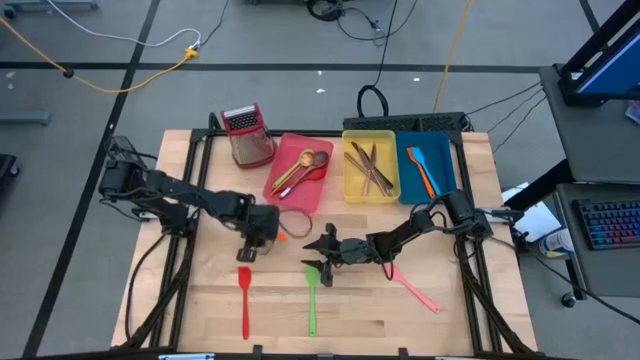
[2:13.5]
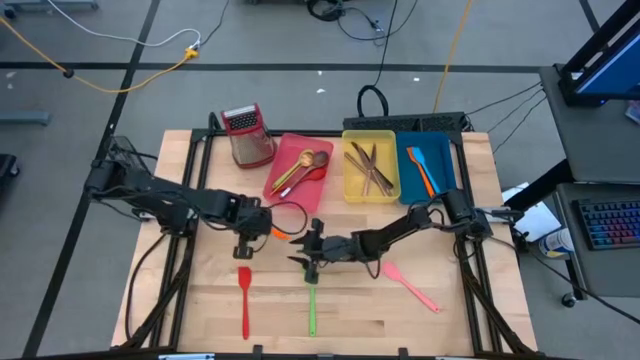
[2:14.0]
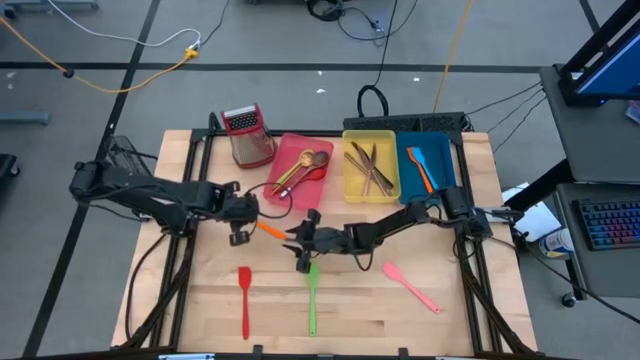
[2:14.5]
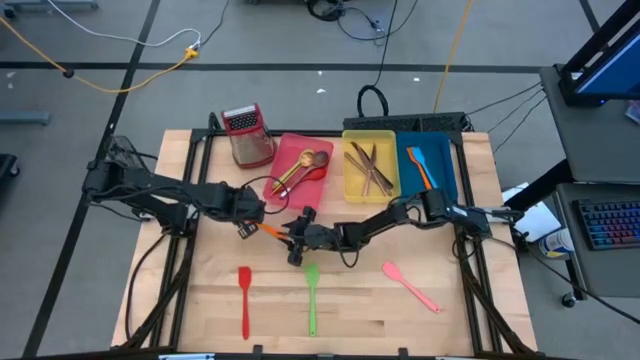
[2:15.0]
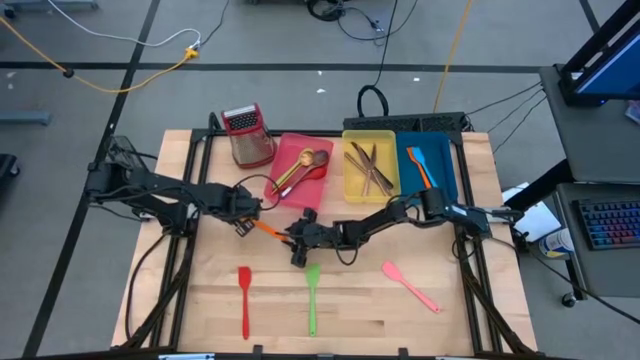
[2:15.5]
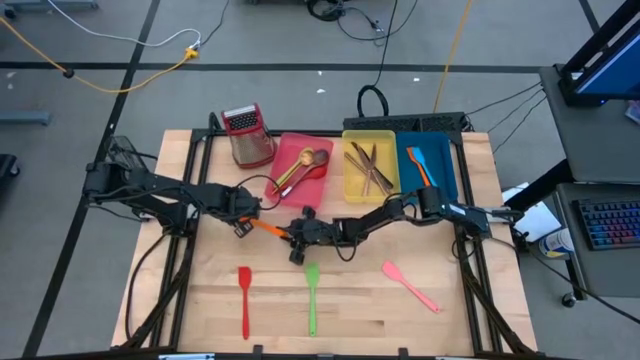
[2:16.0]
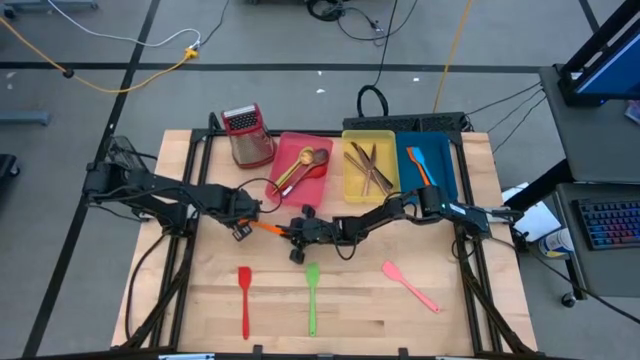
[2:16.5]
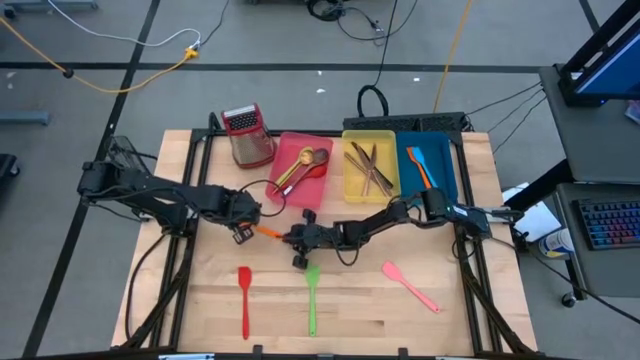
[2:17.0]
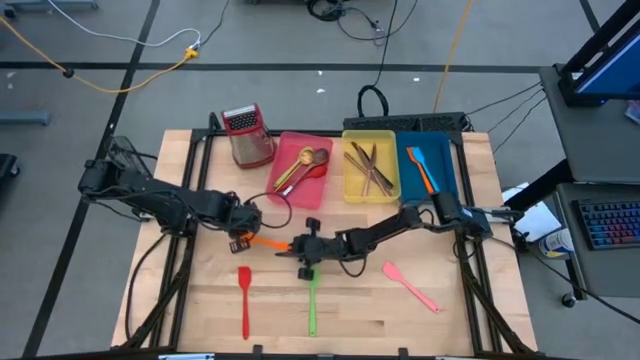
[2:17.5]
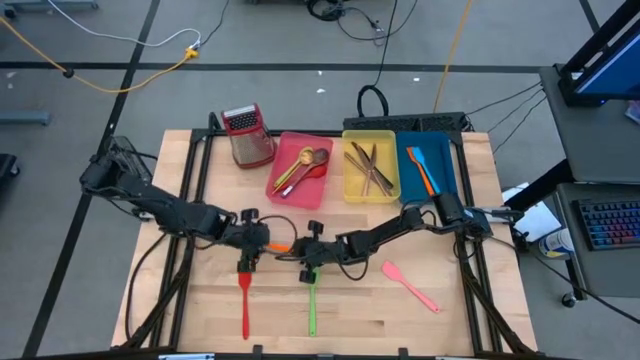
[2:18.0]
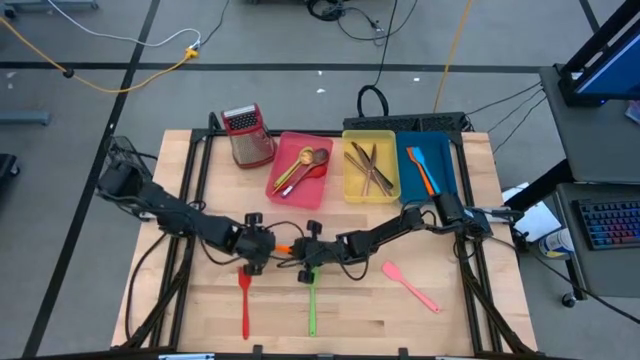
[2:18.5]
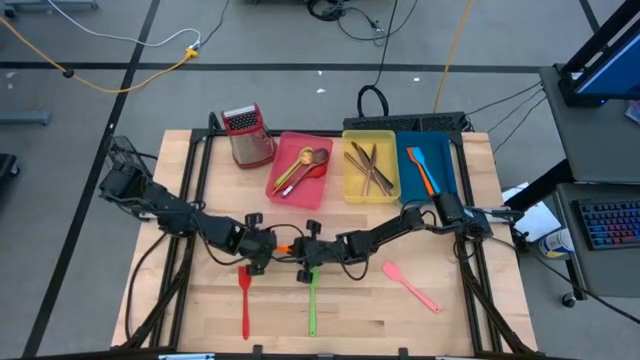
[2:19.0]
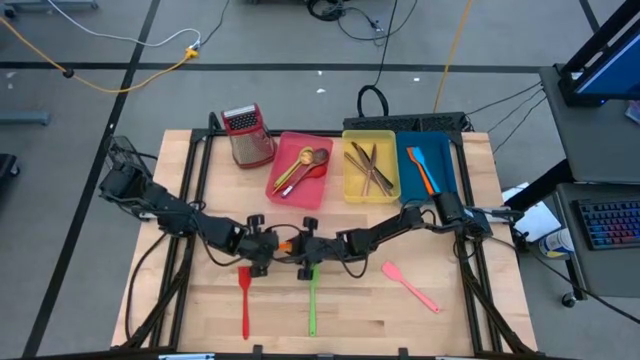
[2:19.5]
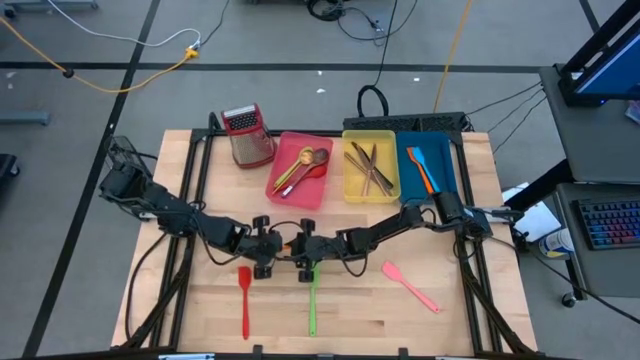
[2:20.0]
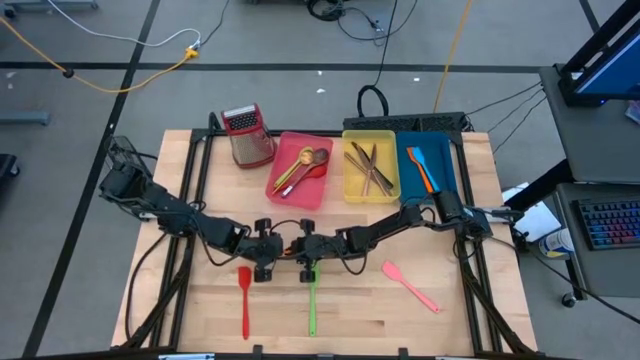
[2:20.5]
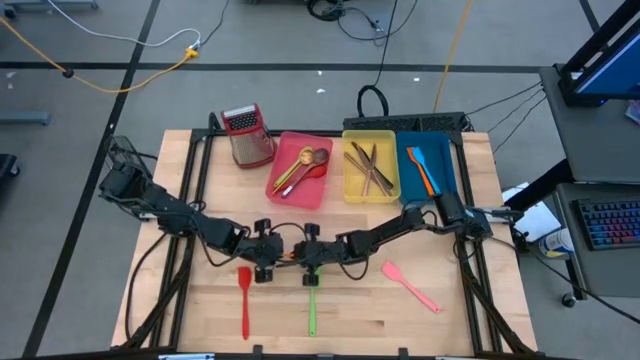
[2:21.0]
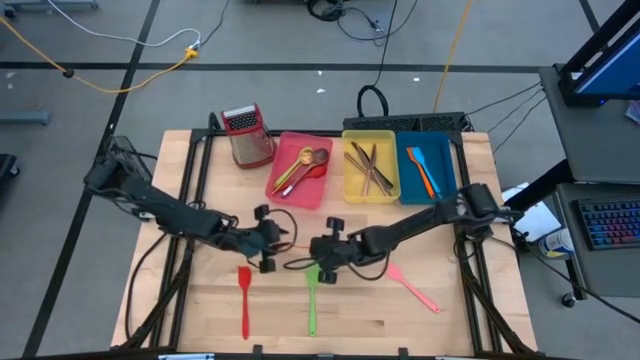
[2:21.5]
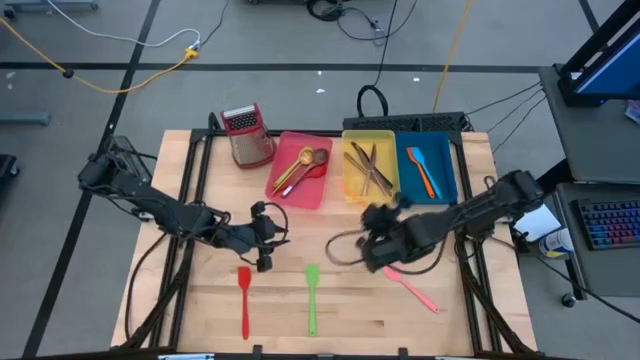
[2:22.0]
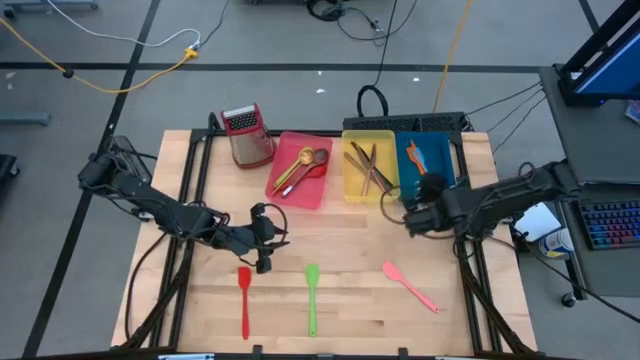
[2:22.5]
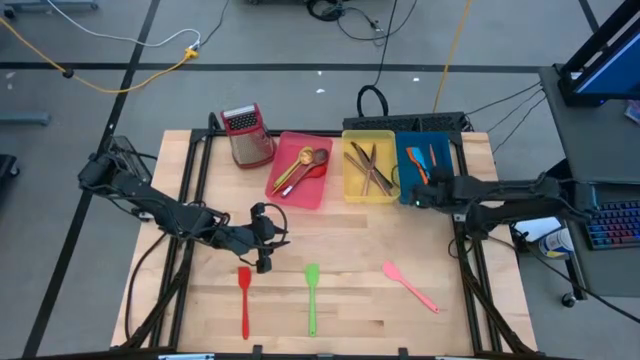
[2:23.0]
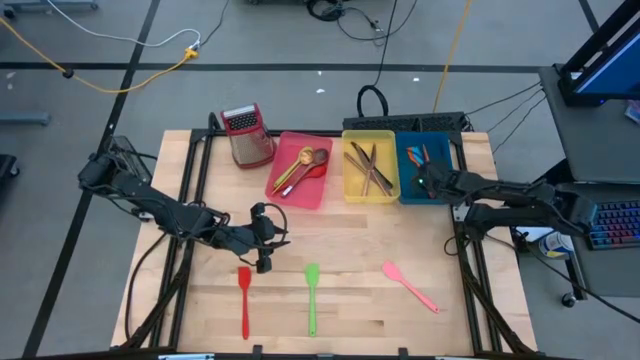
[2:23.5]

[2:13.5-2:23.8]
Task: Pick & Place Kitchen Items
Put the orange serving spoon into the blue bin

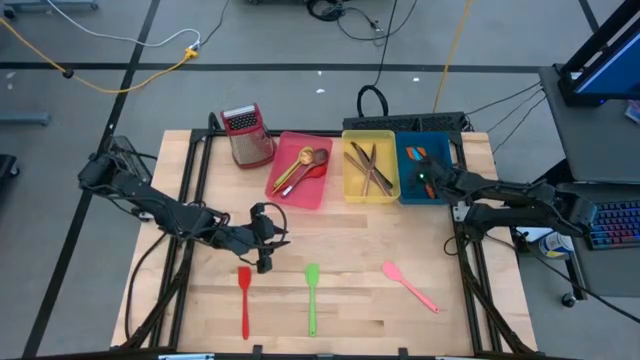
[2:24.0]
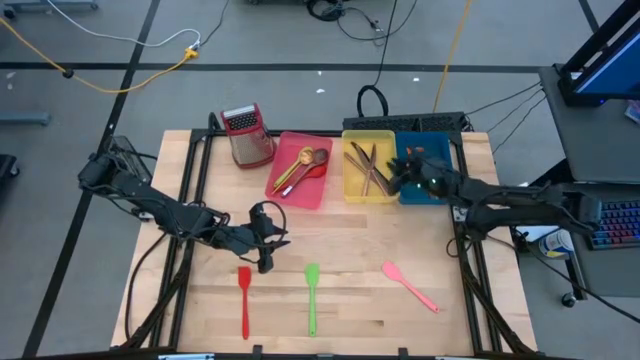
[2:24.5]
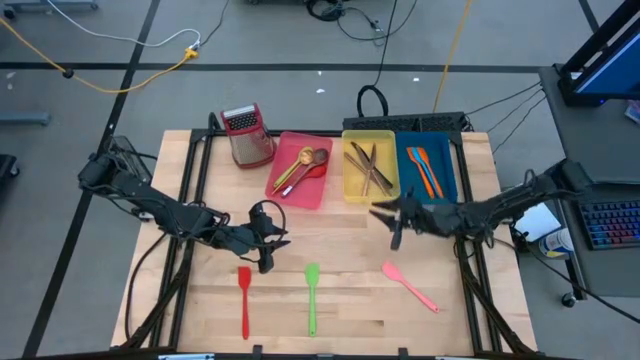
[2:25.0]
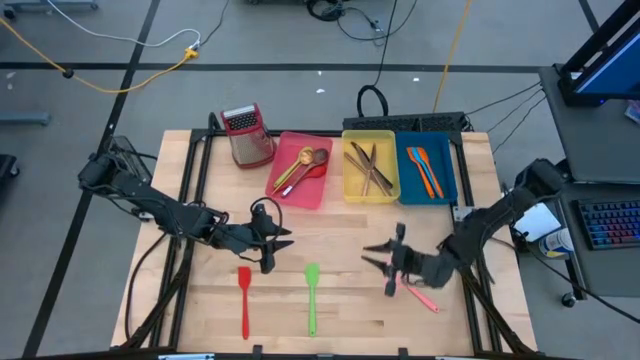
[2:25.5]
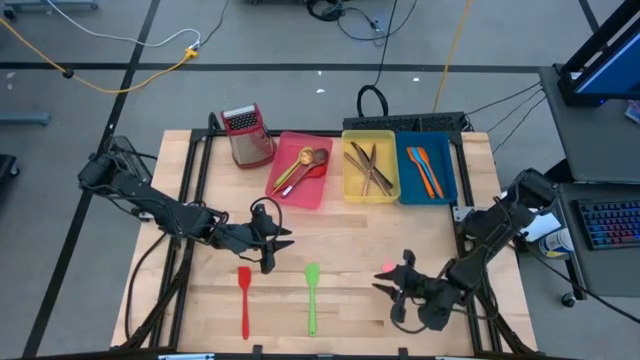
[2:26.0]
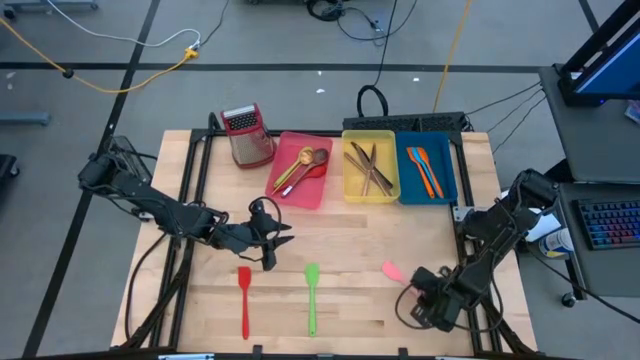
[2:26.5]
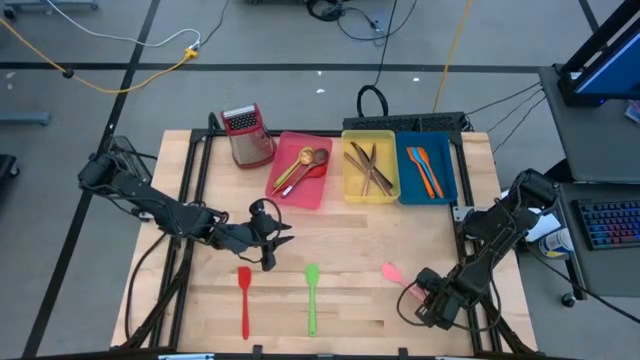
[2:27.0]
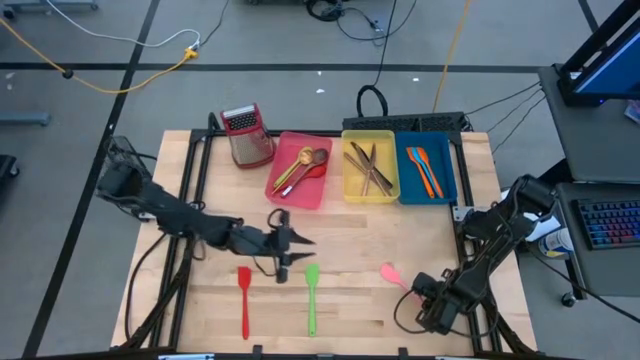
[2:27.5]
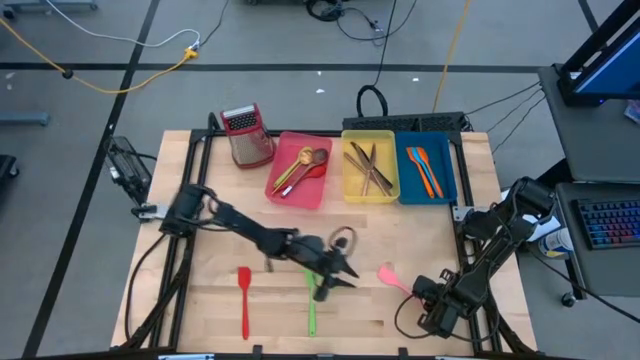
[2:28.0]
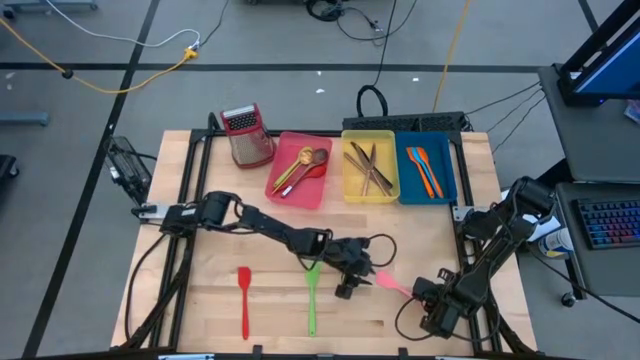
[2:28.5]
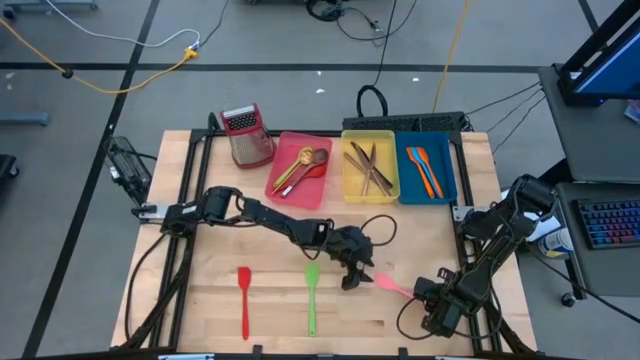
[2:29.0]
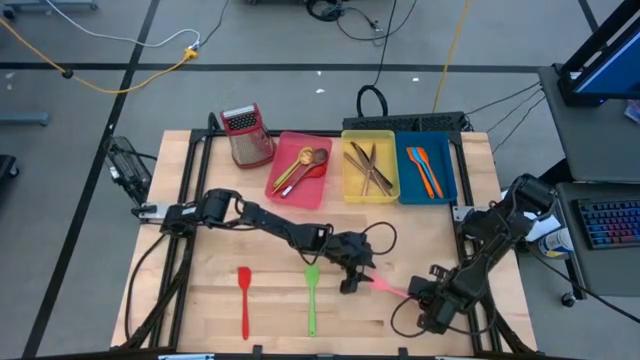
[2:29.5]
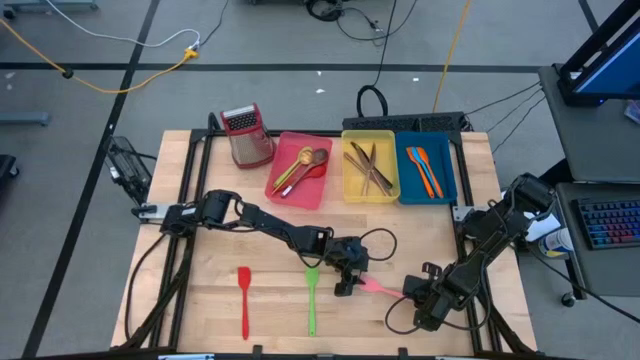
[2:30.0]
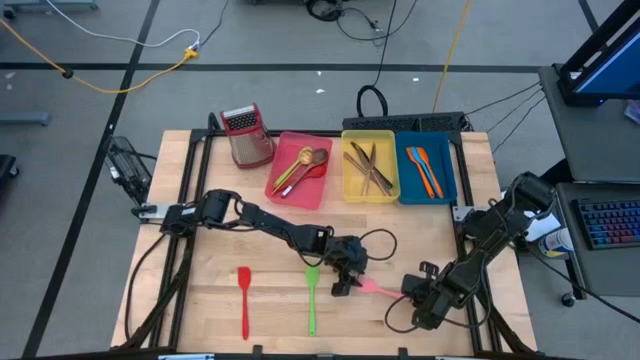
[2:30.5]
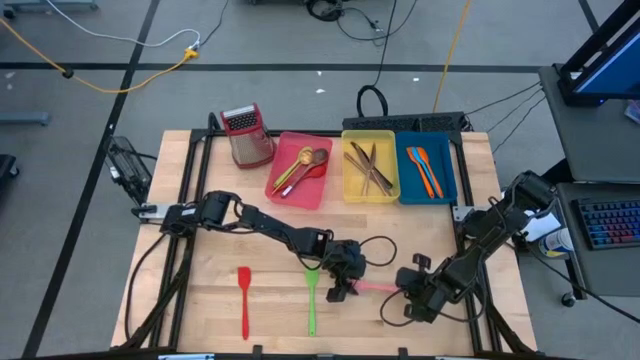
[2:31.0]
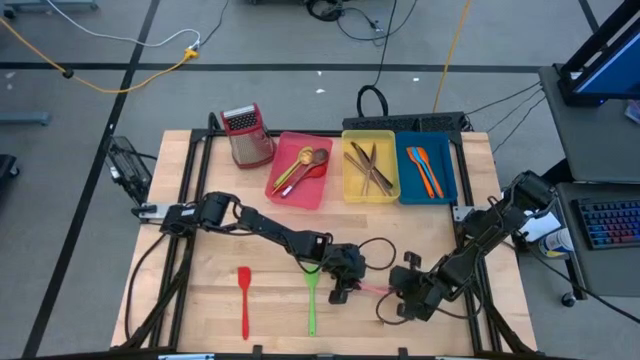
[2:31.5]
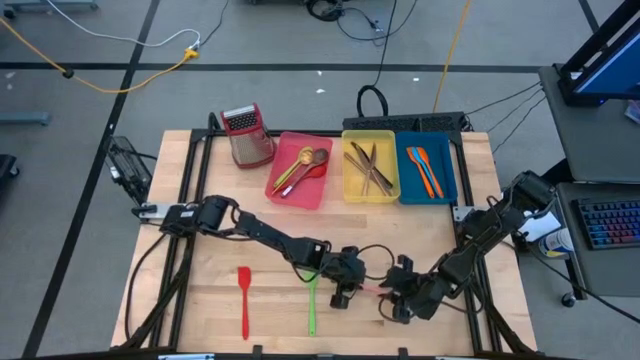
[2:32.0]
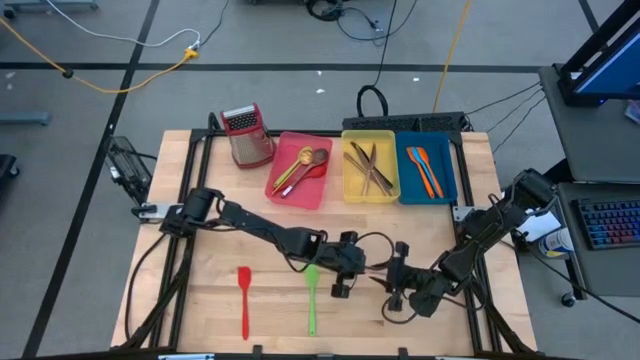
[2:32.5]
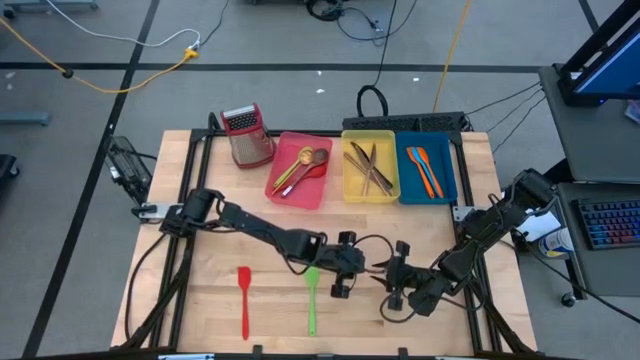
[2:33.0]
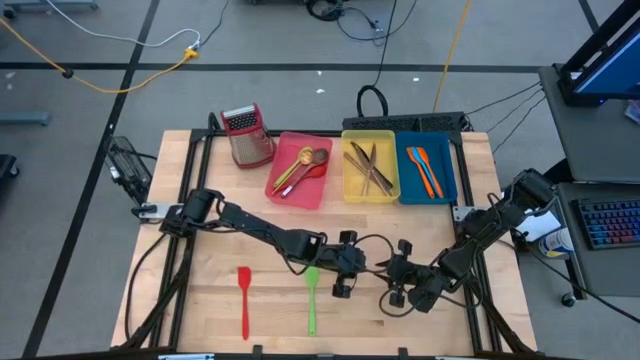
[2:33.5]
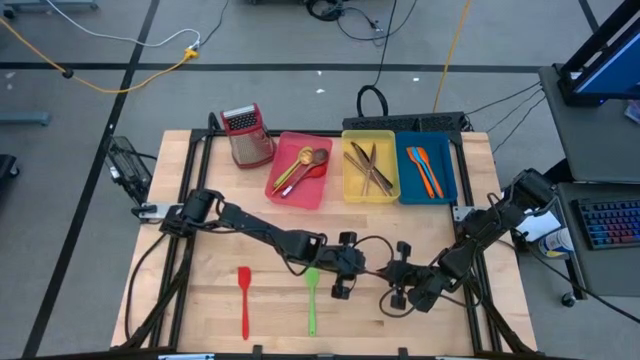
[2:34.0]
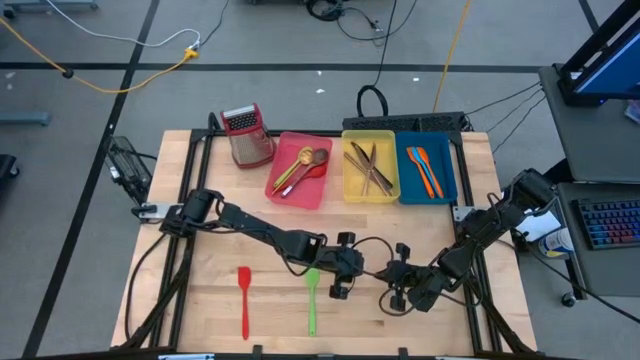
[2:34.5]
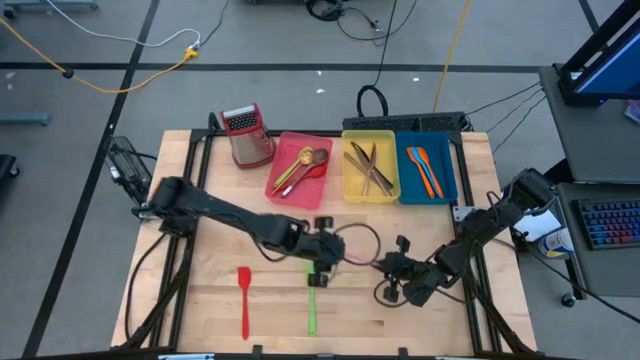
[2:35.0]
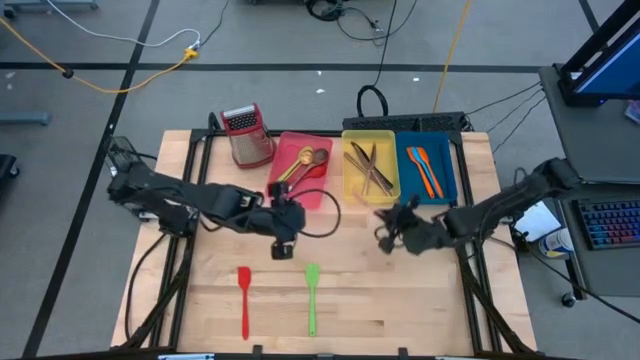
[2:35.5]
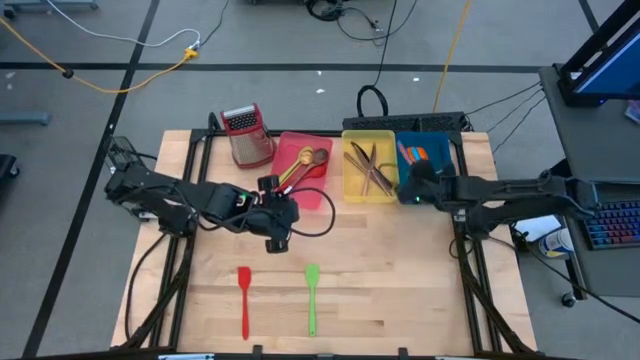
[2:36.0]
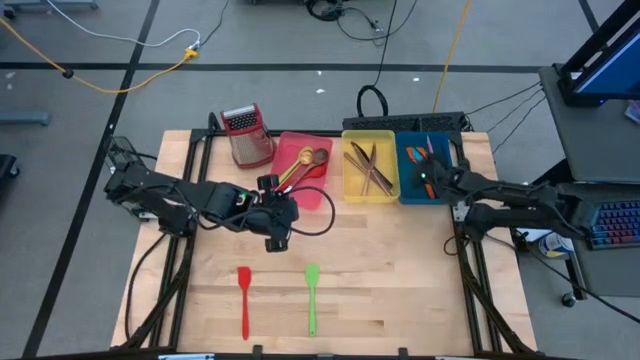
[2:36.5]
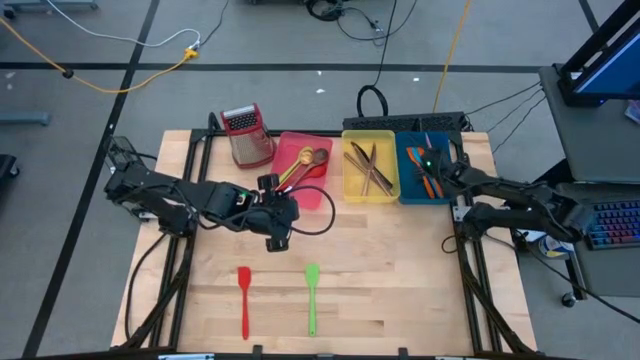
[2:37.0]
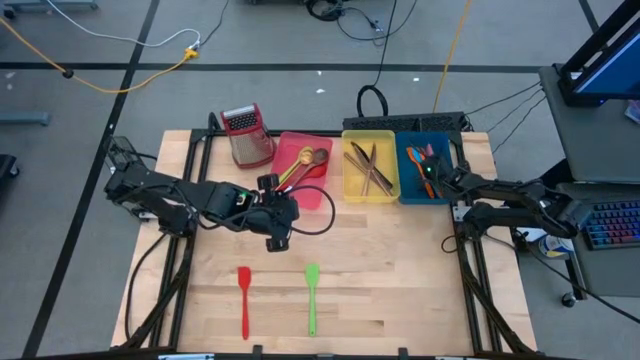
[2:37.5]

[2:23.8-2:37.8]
Put the pink serving spoon into the blue bin
